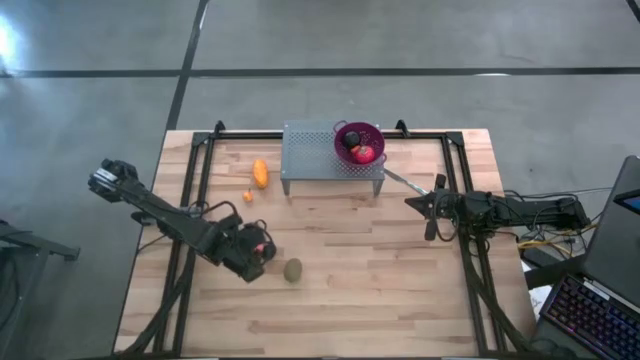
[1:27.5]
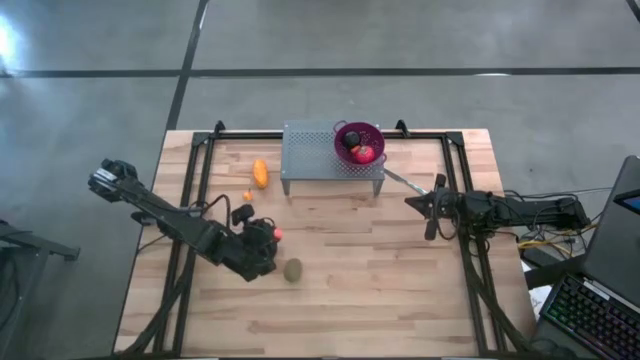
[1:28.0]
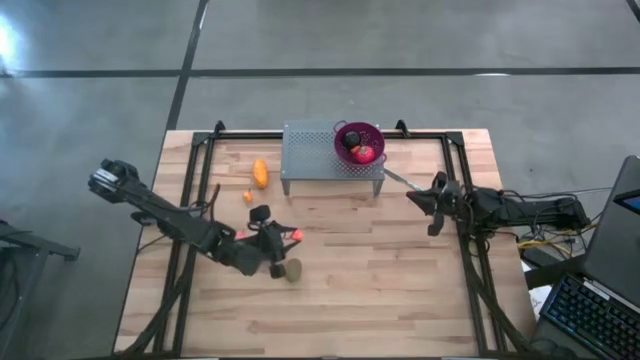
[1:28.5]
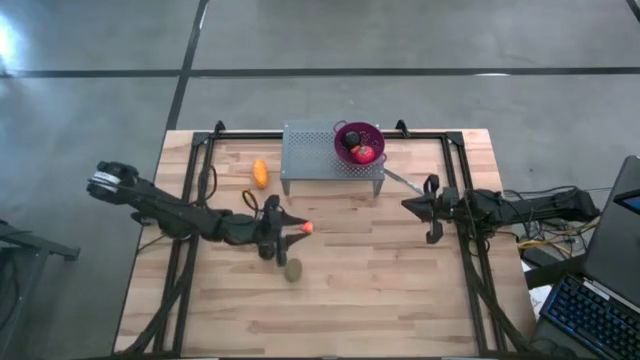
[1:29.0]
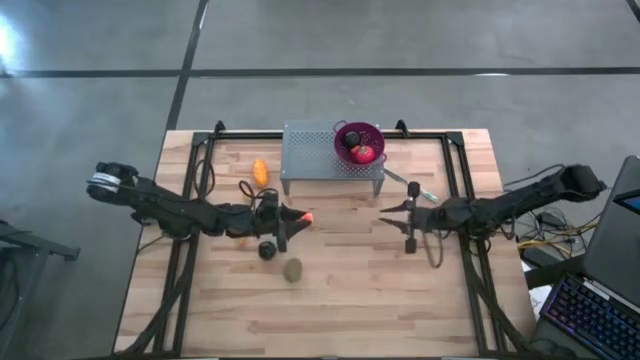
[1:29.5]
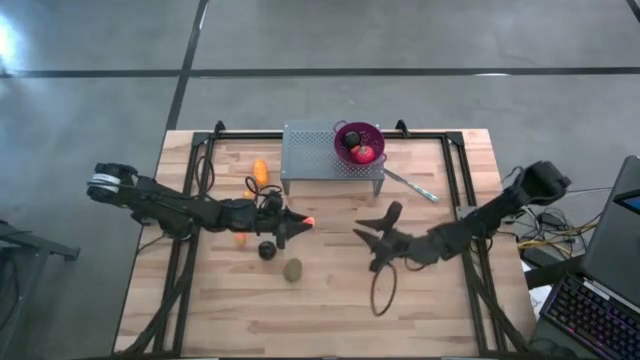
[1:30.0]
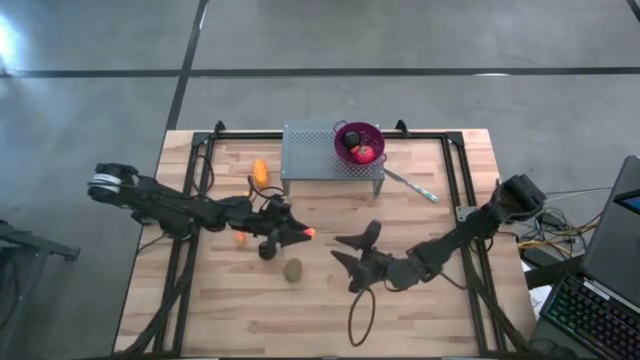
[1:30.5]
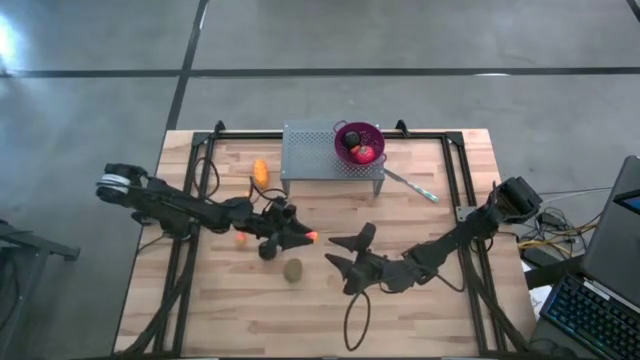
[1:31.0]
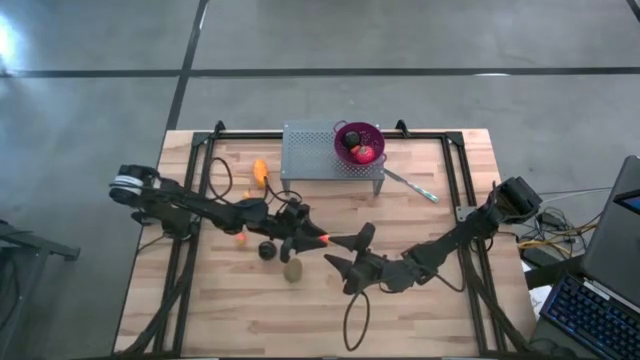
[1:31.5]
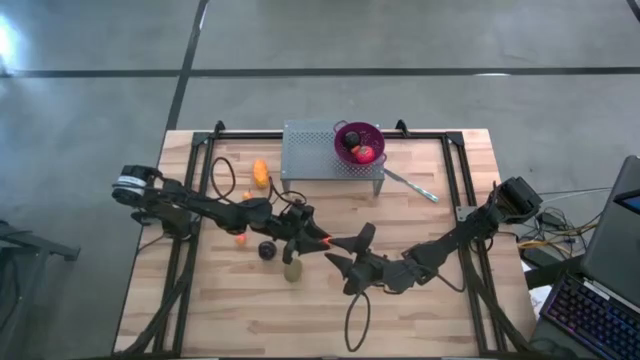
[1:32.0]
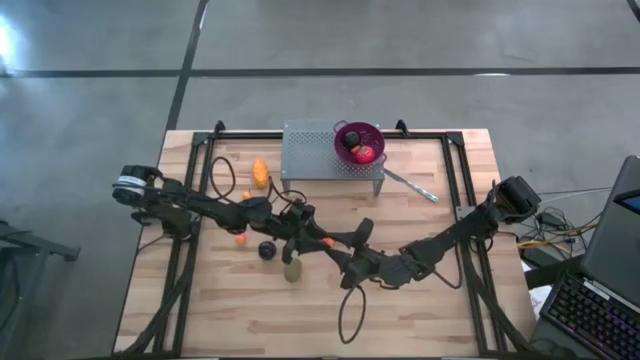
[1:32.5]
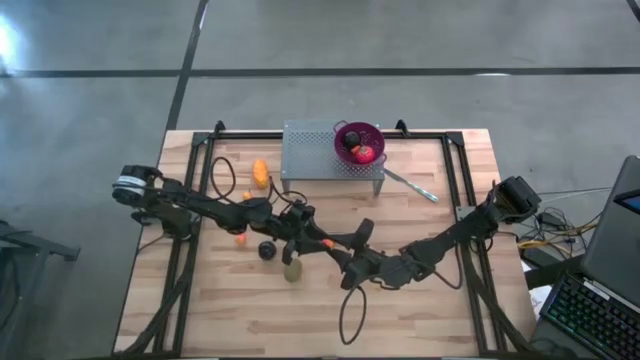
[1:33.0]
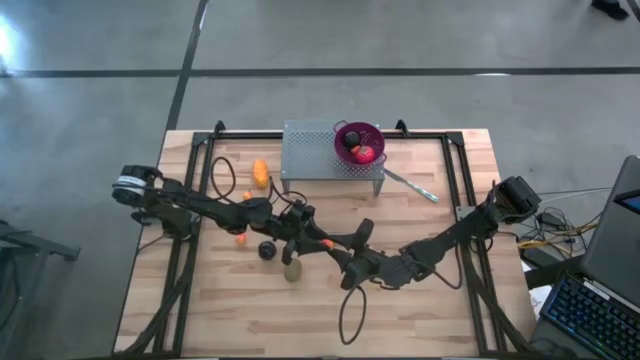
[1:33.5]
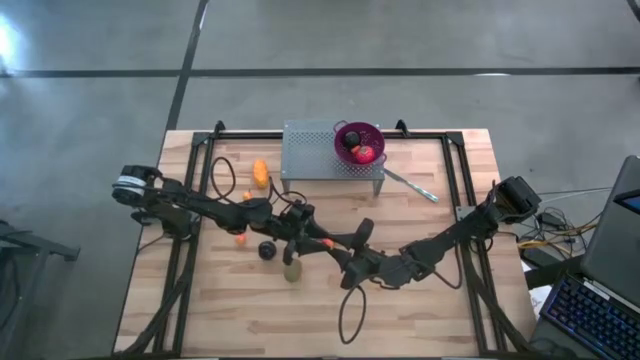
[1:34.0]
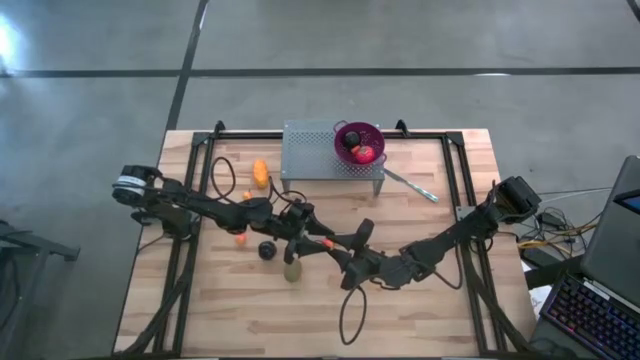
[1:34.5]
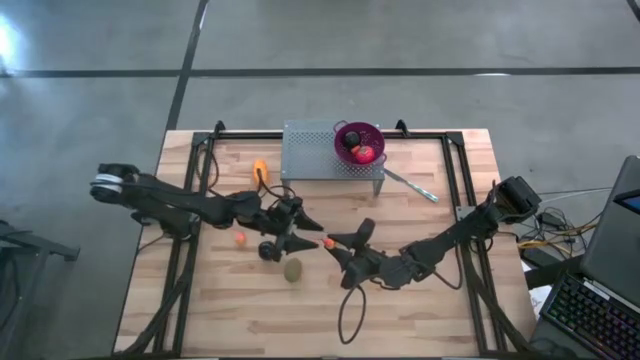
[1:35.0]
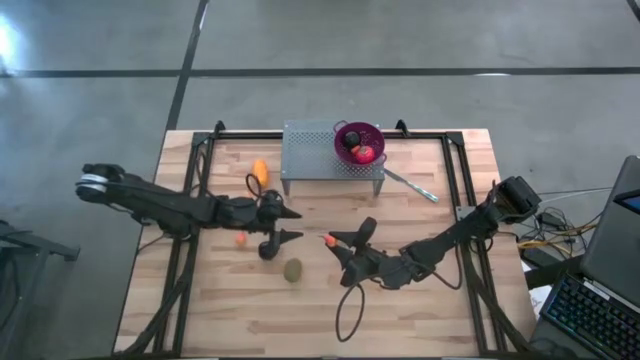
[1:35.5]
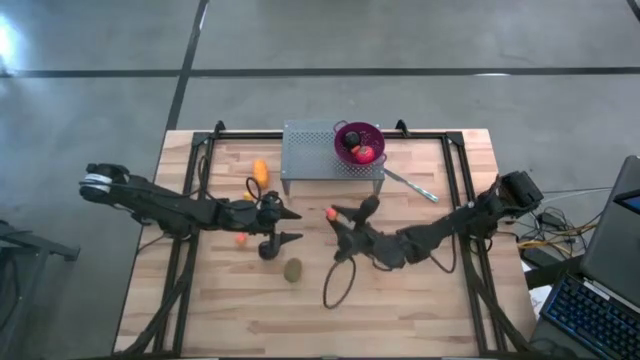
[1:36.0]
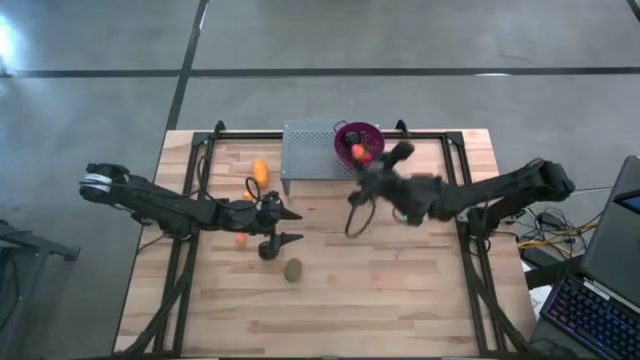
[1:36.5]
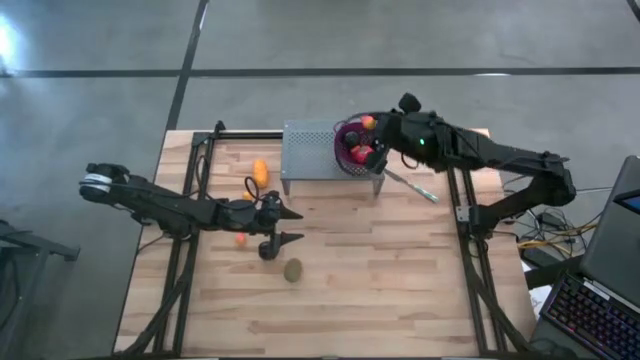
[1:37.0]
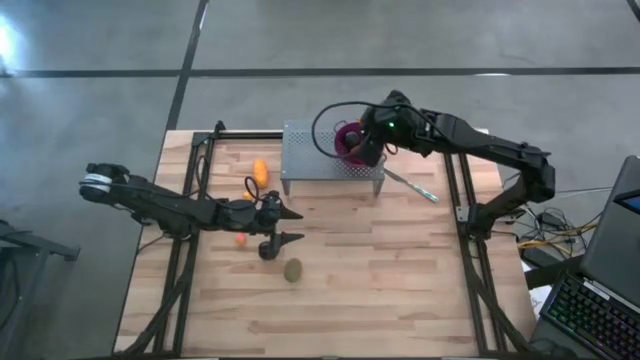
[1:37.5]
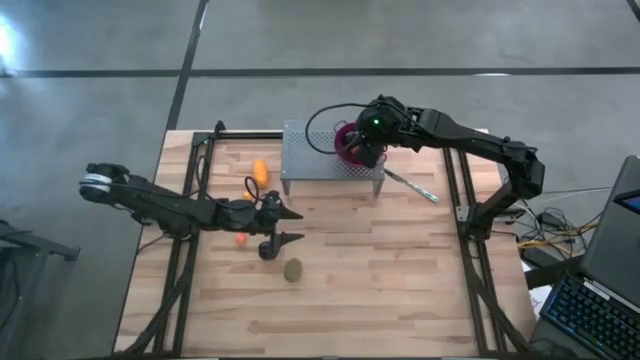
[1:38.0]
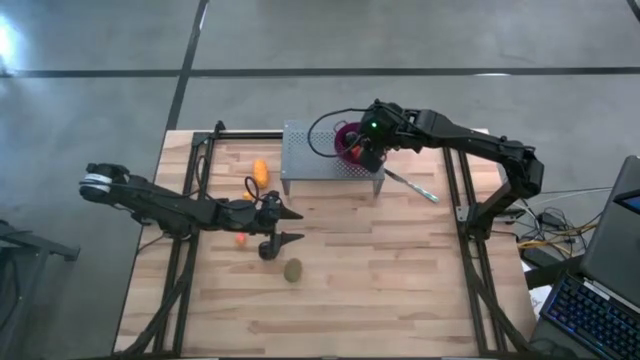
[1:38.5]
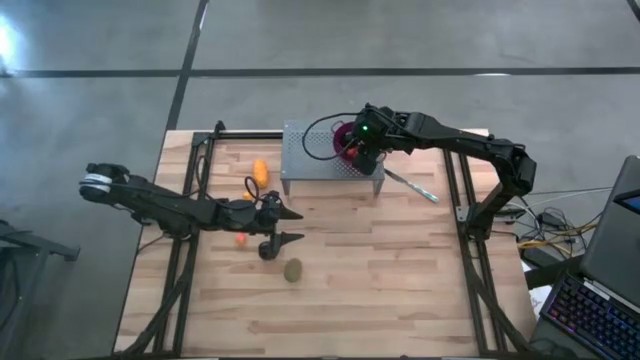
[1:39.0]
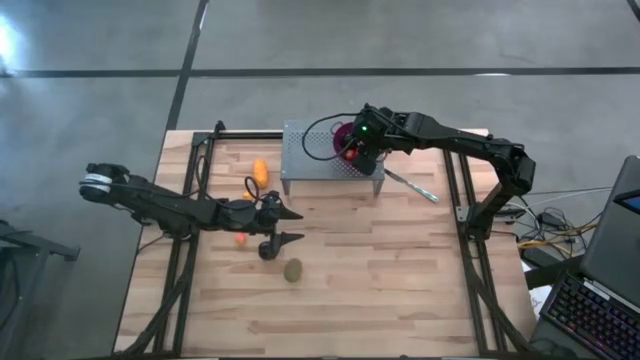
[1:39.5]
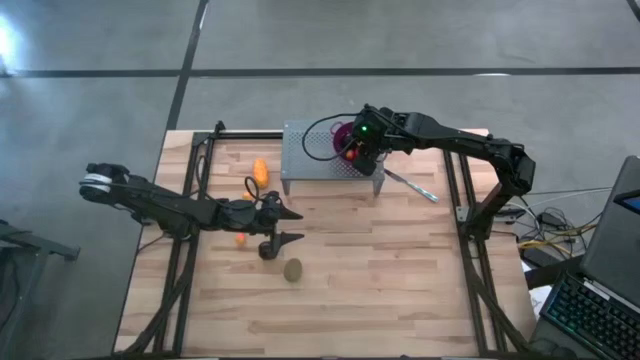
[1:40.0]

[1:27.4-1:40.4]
Task: Pick & Place Fruit
Put the pear into the purple strainer bowl on the shelf

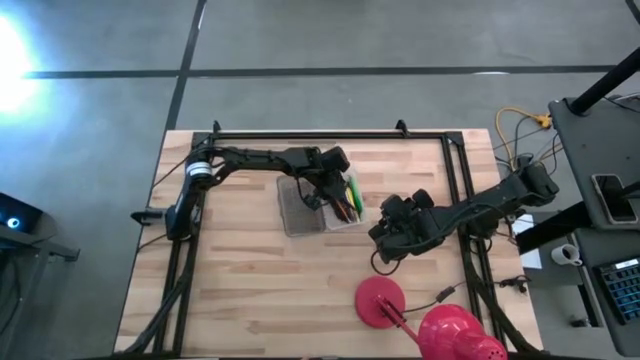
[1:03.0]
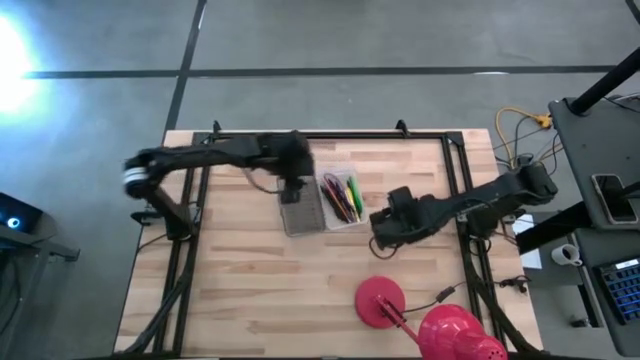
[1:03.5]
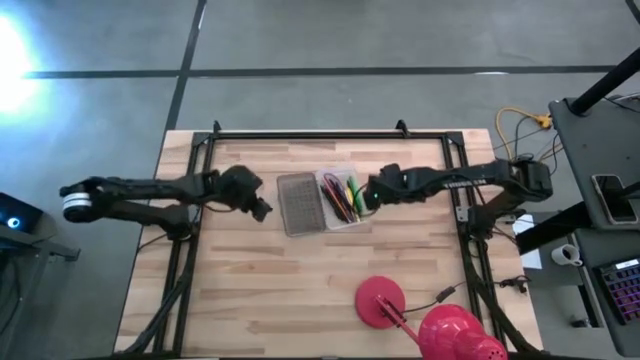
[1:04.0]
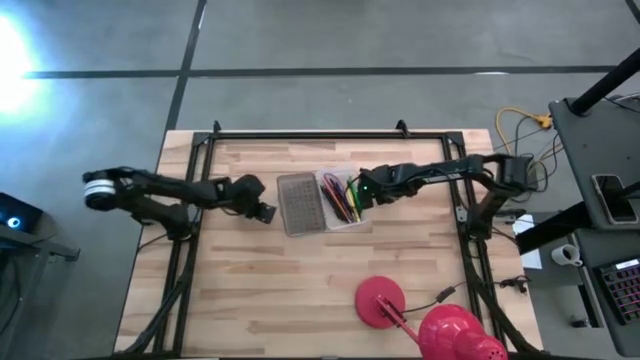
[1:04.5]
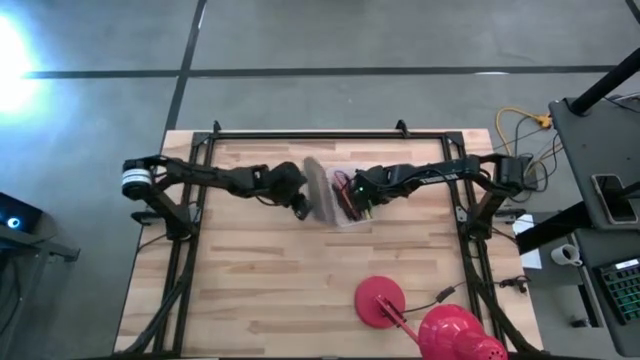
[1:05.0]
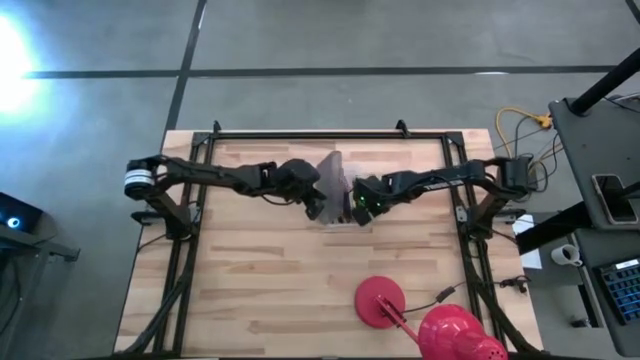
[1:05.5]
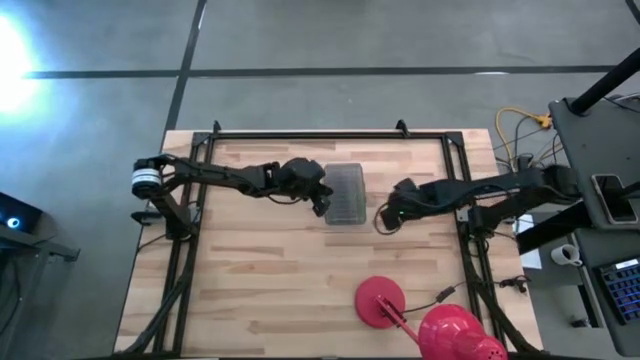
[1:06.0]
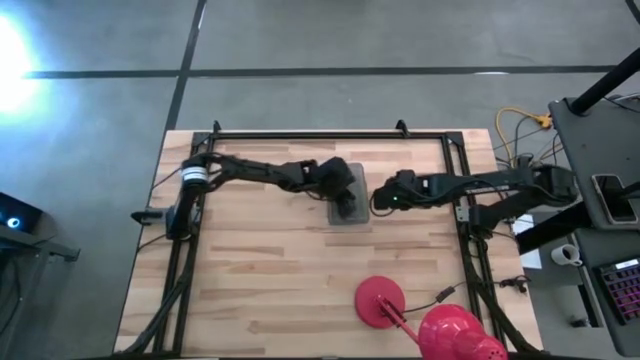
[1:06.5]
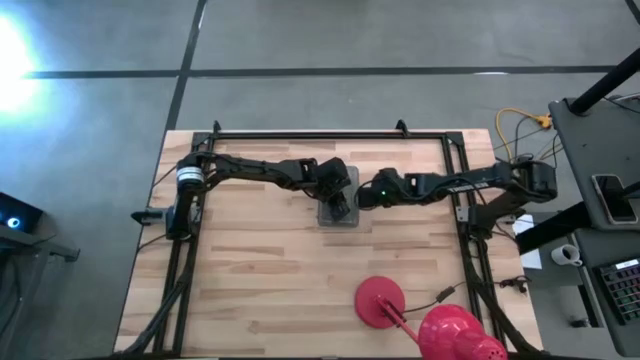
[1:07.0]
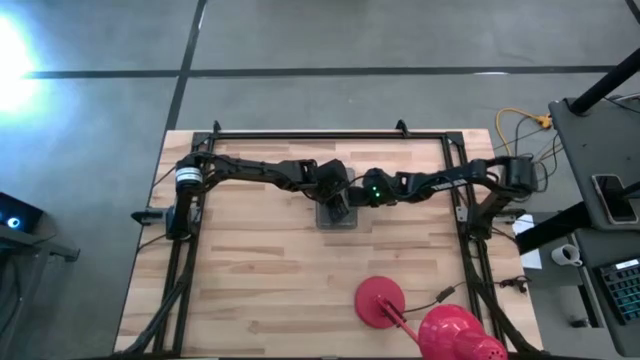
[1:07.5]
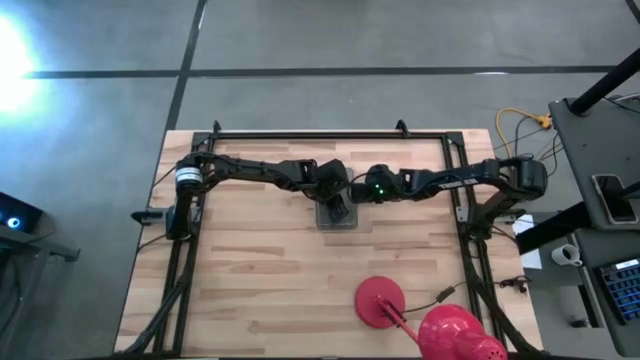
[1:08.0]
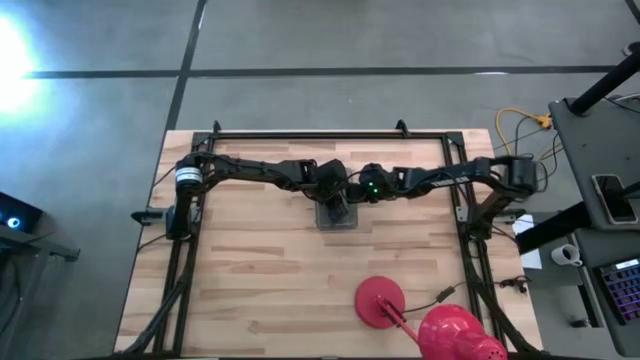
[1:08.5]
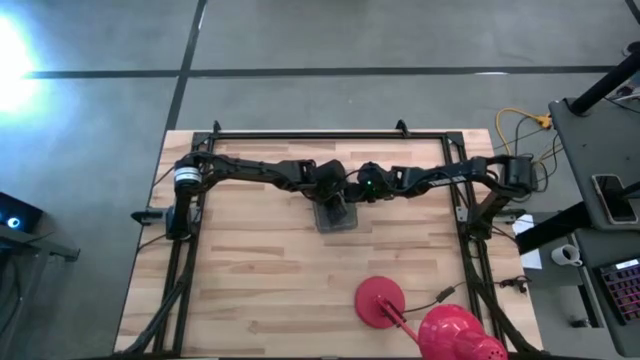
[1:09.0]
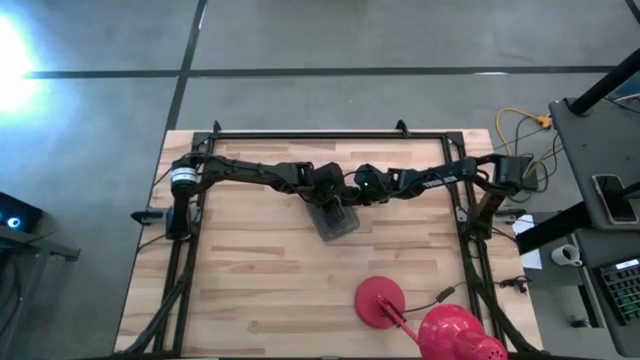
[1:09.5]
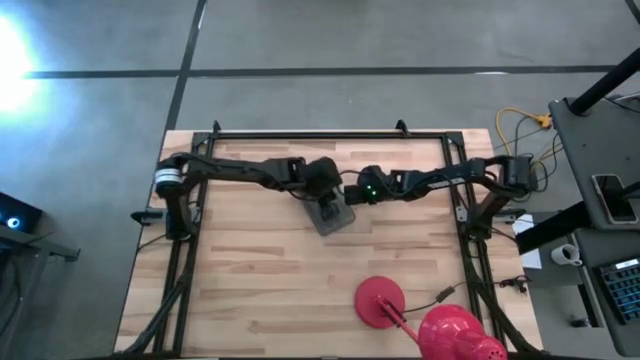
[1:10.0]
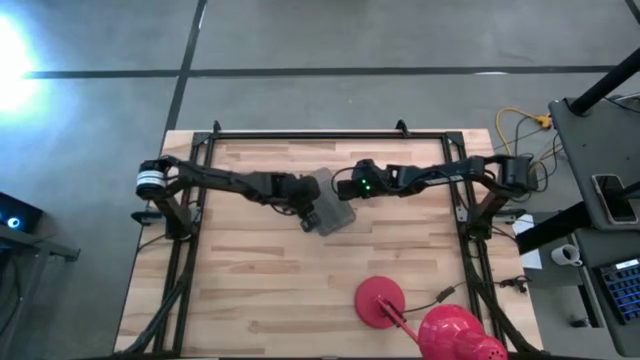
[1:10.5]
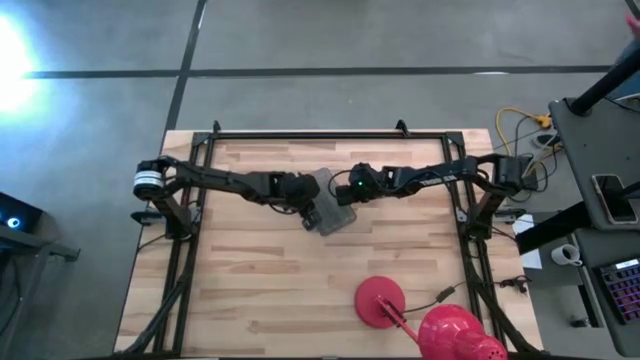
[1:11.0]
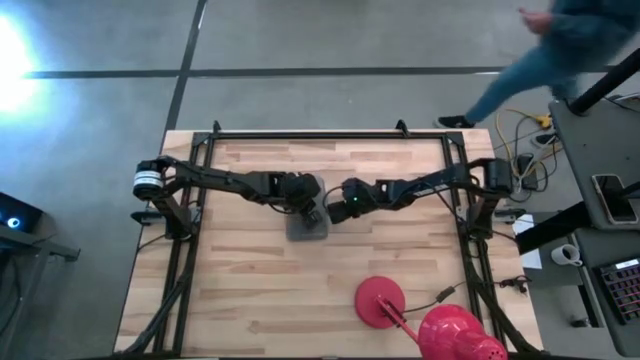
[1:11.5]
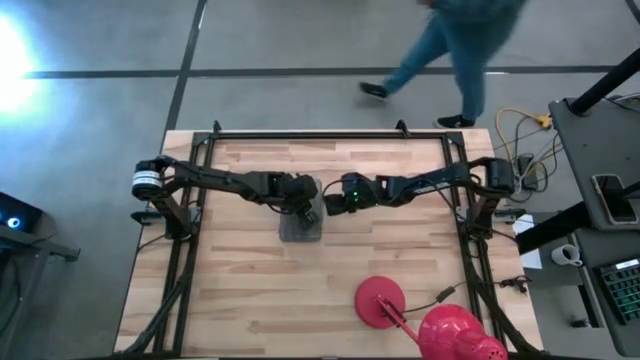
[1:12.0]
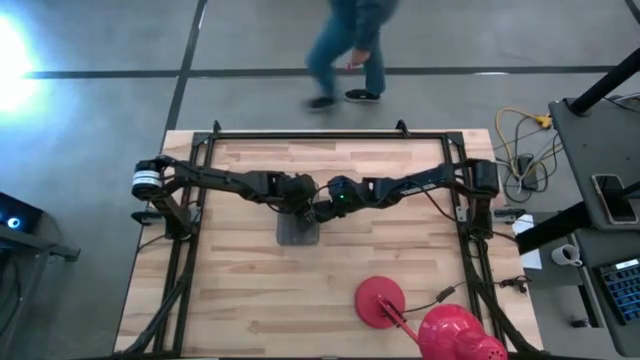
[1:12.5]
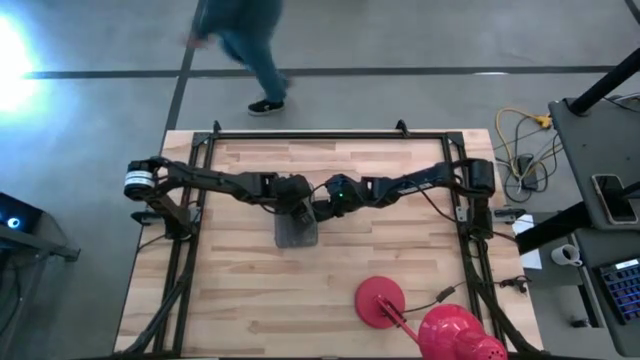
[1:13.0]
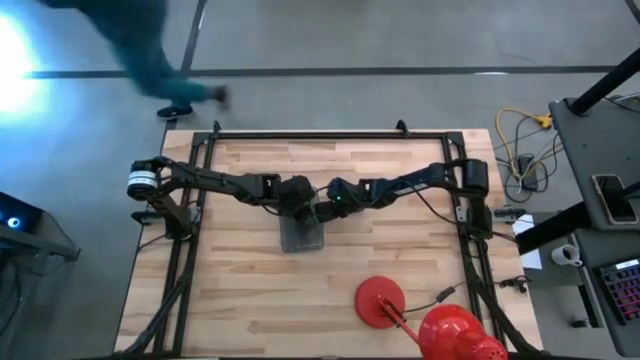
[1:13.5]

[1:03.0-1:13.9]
Task: Pick & place school supplies into a supply box
Close the black supply box
